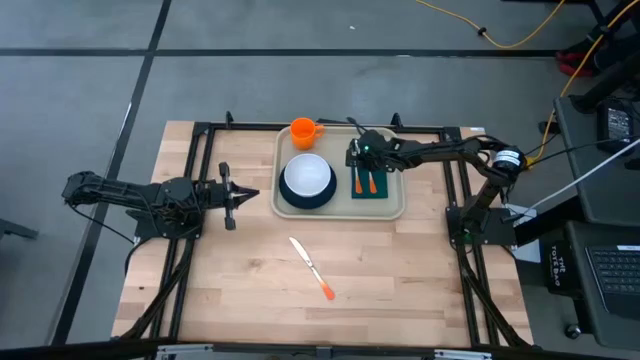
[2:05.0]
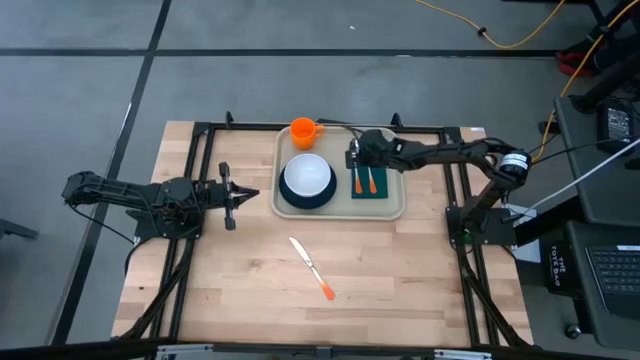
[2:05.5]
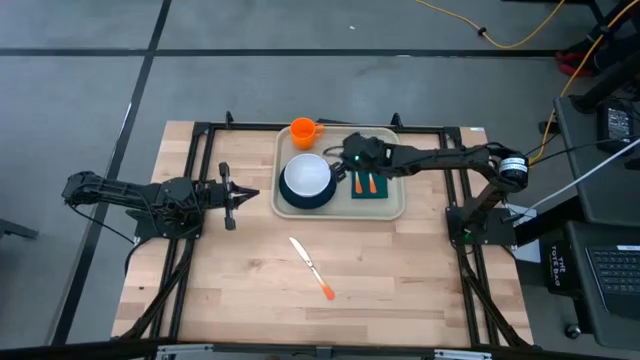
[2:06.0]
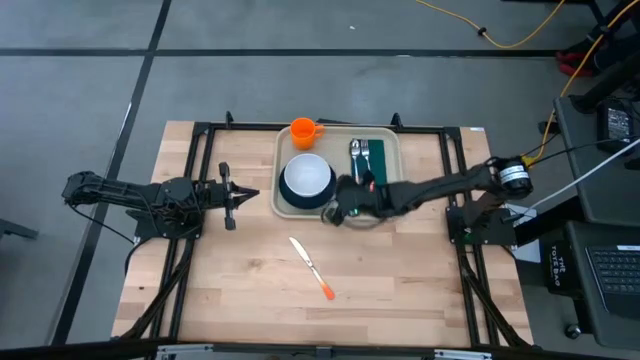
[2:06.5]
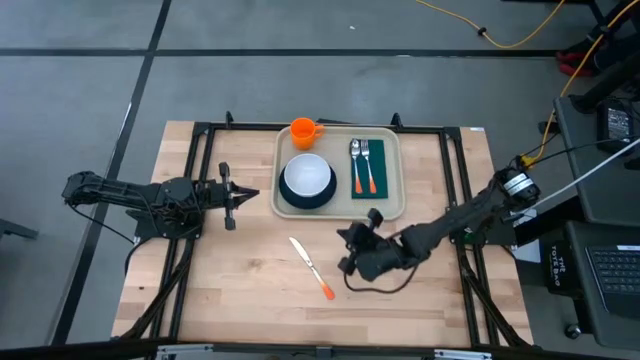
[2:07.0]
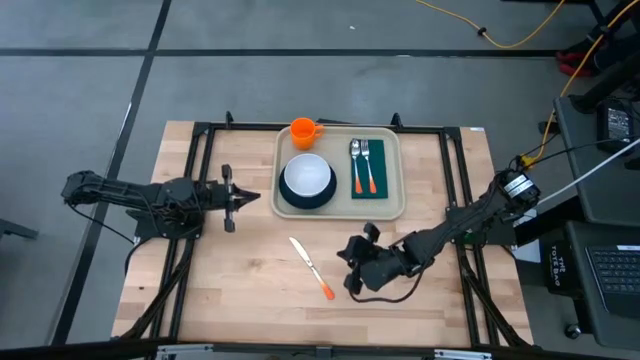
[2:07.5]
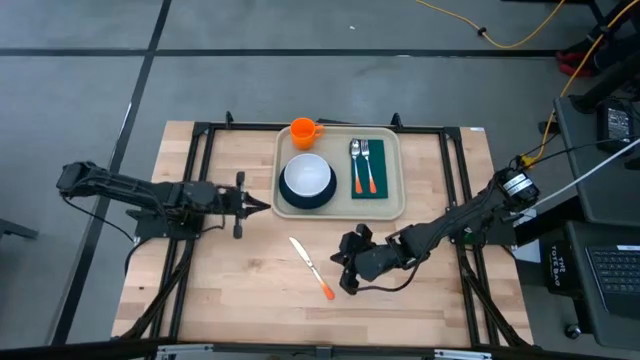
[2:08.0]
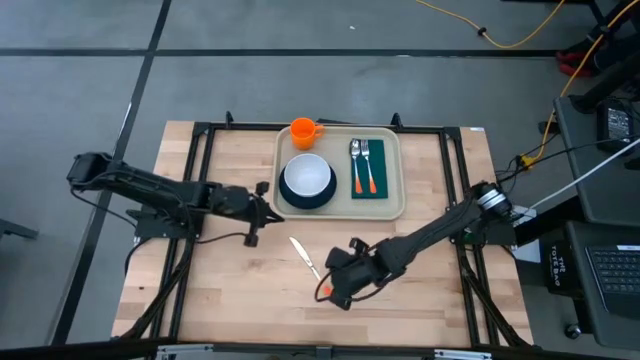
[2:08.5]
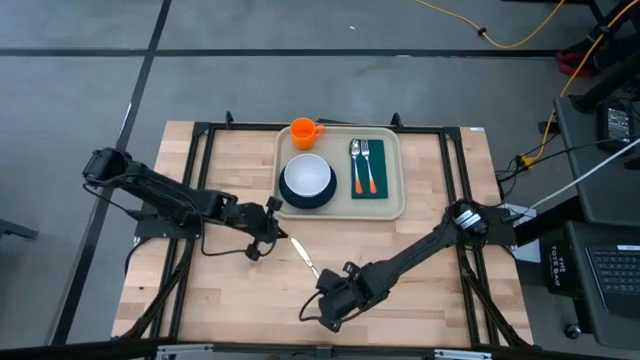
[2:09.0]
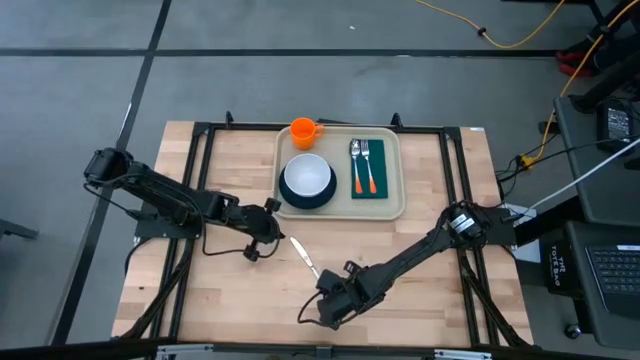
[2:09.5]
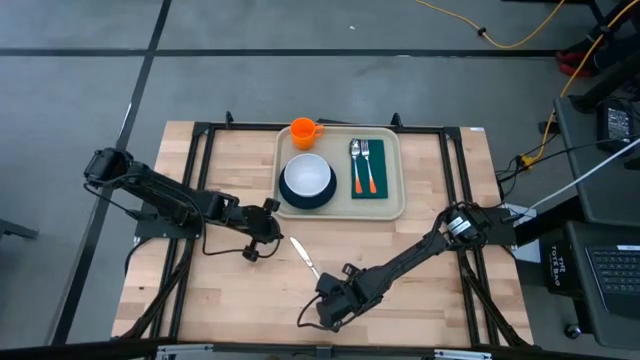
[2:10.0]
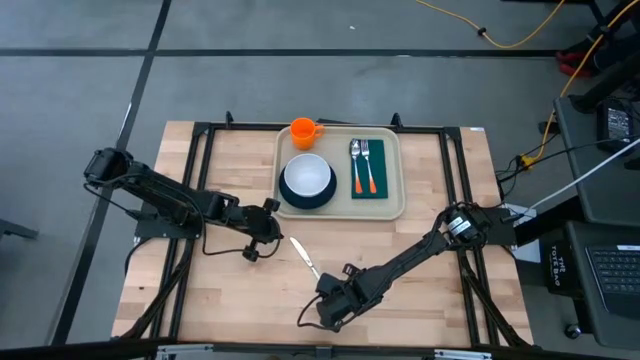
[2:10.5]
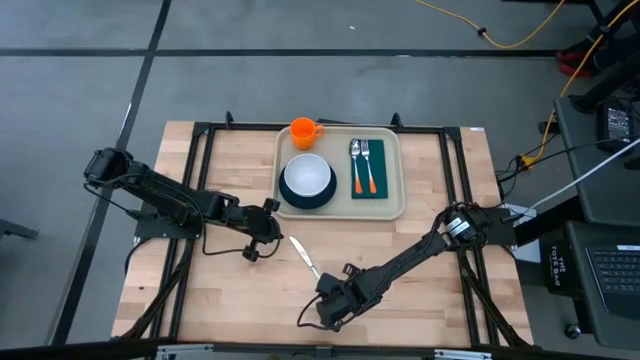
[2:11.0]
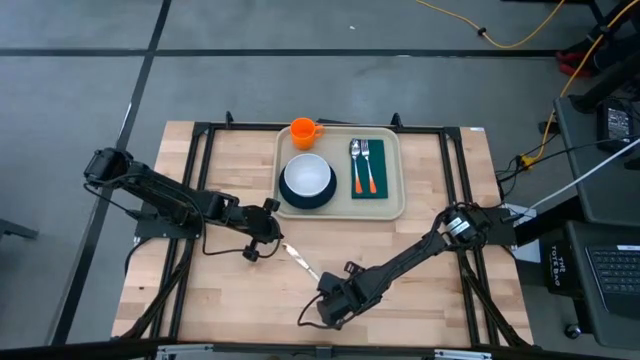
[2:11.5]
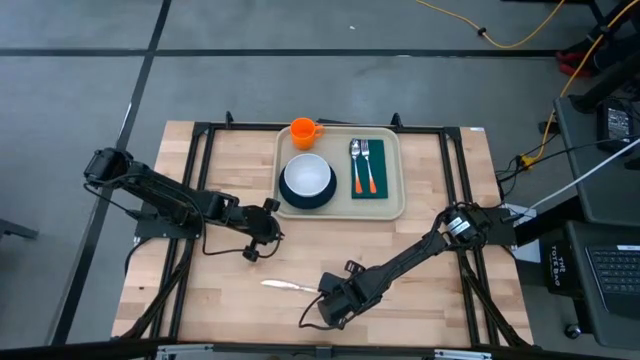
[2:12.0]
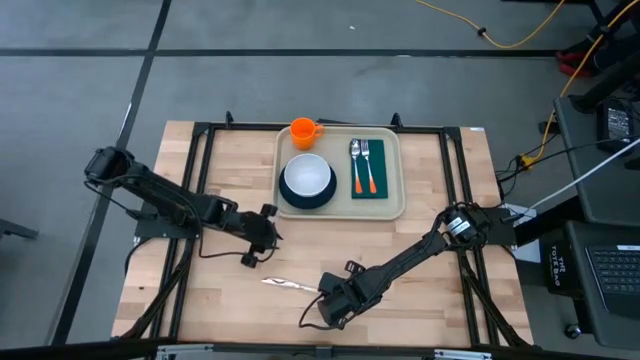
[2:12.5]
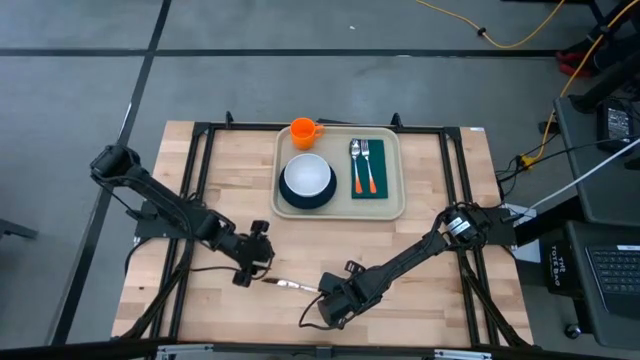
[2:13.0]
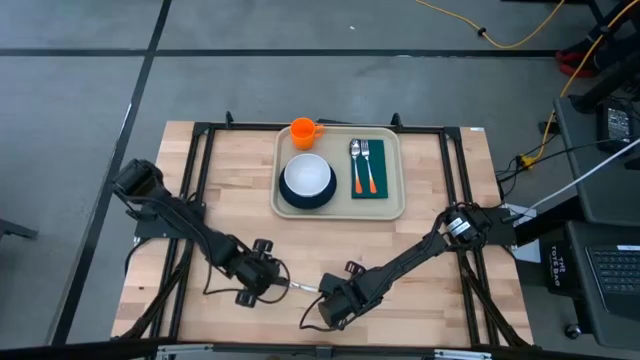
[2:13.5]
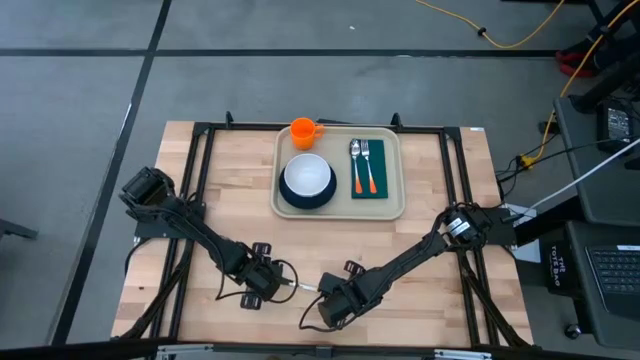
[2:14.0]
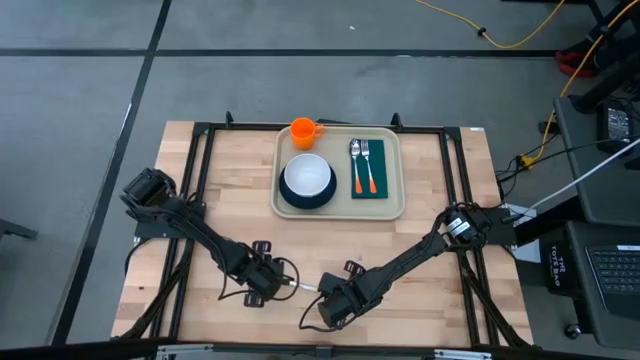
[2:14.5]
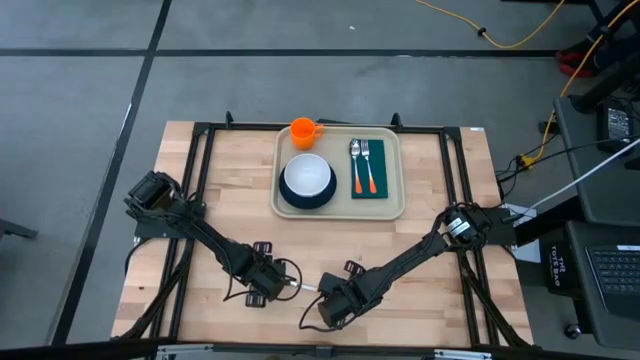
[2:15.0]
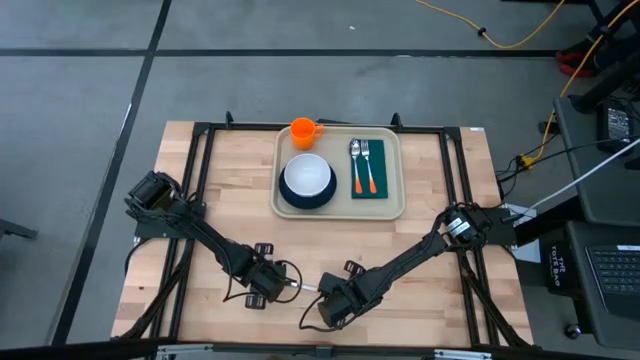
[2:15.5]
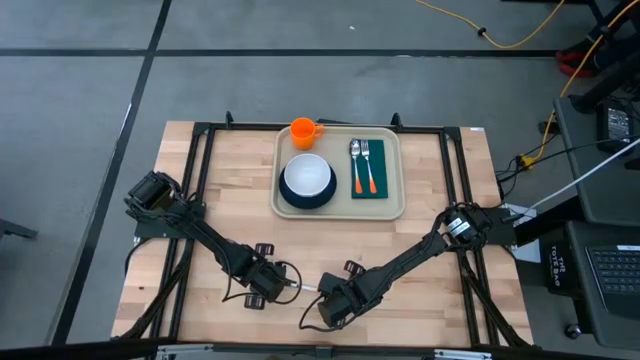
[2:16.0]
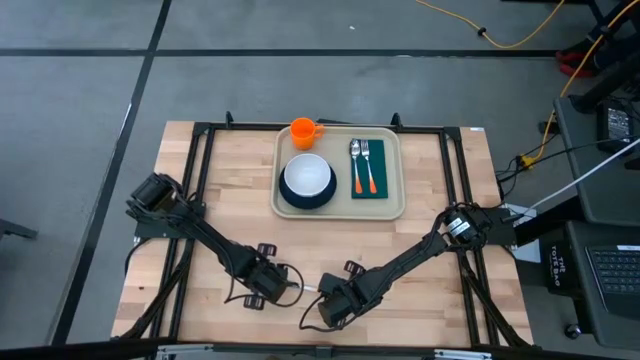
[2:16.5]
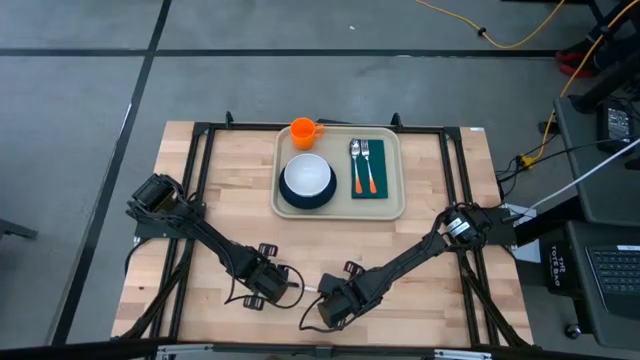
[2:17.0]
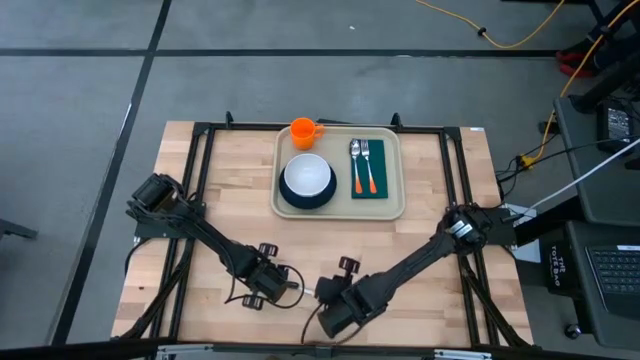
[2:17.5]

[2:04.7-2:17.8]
Task: Set up tray
Put the orange knife on the dark green napkin on the gray tray

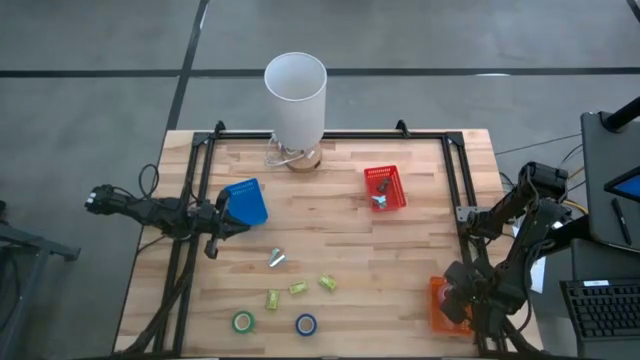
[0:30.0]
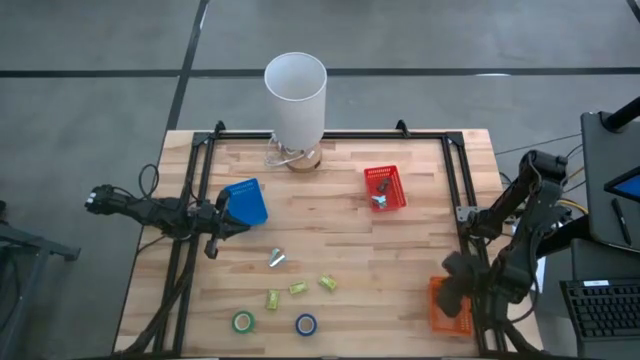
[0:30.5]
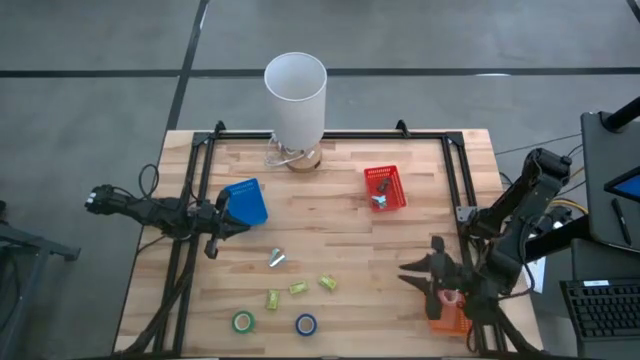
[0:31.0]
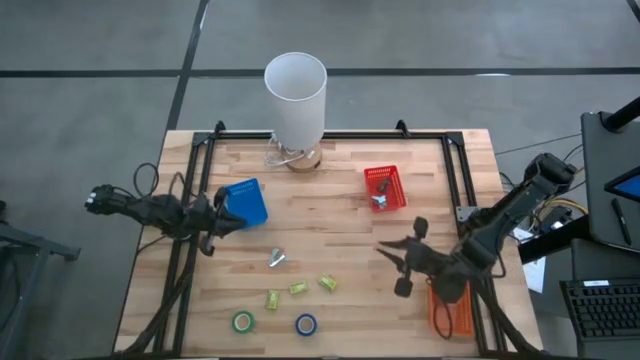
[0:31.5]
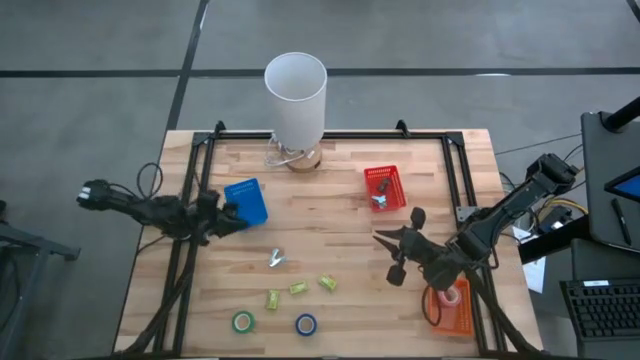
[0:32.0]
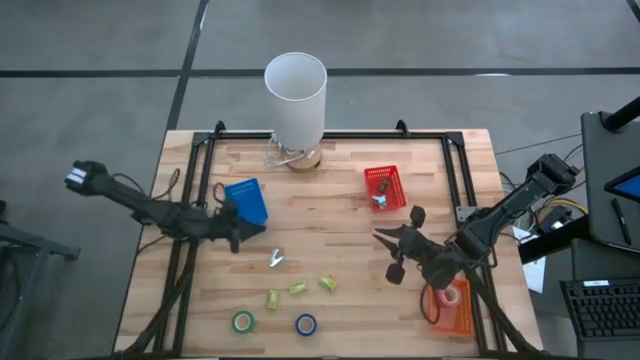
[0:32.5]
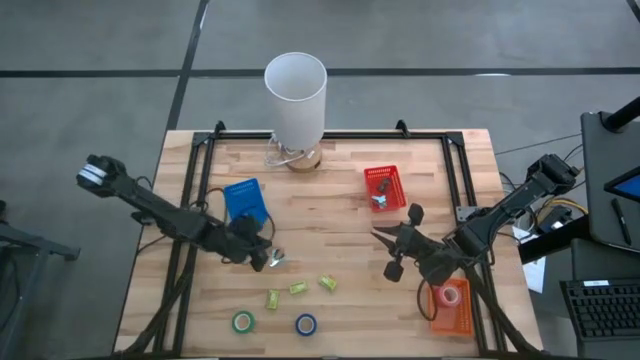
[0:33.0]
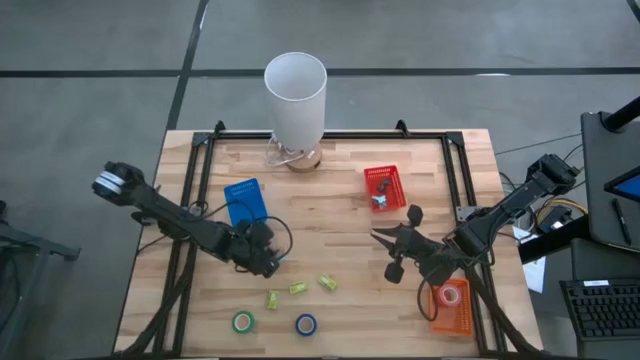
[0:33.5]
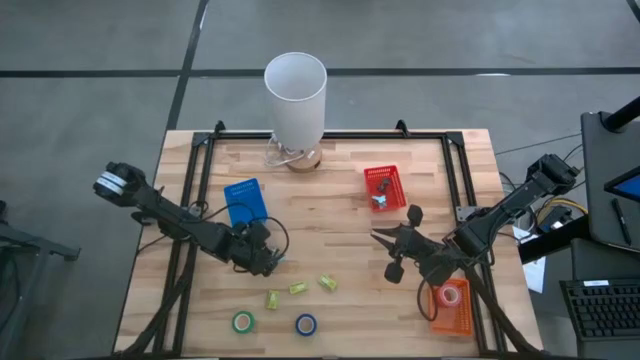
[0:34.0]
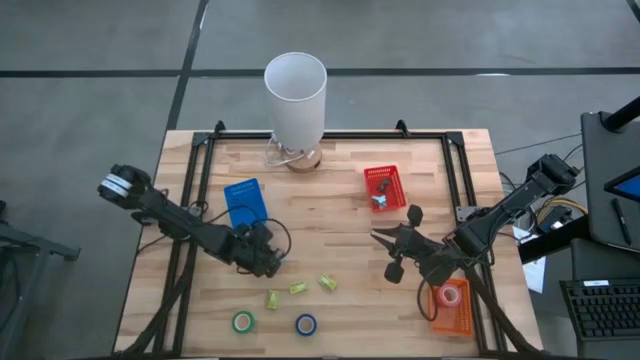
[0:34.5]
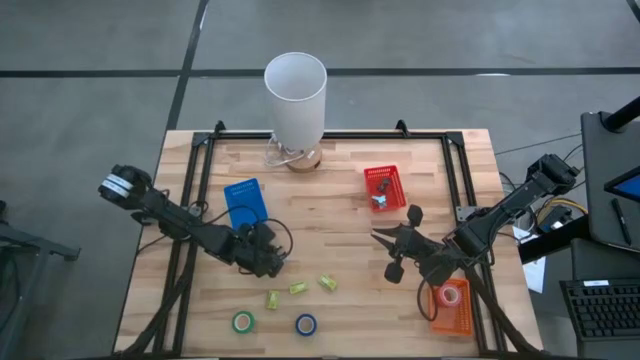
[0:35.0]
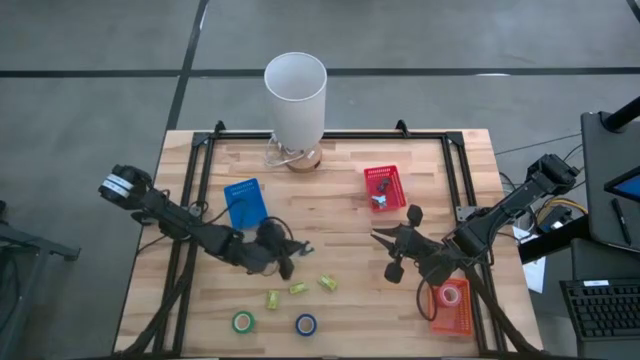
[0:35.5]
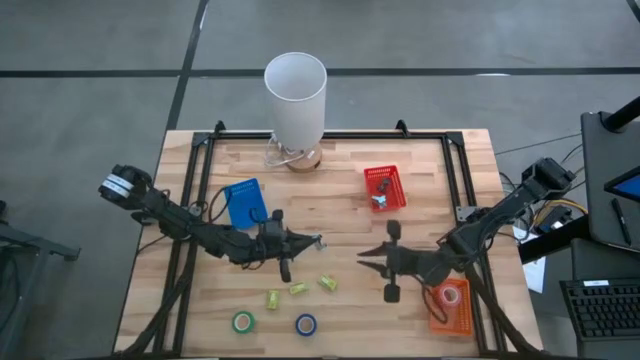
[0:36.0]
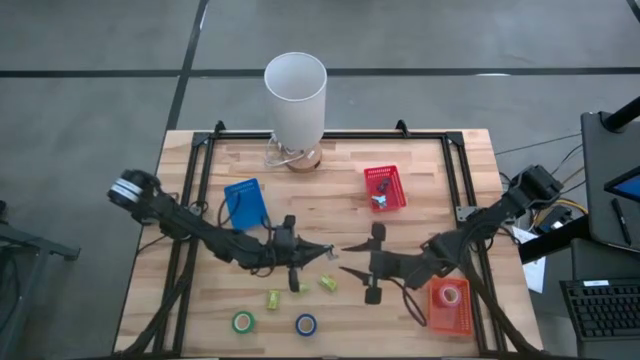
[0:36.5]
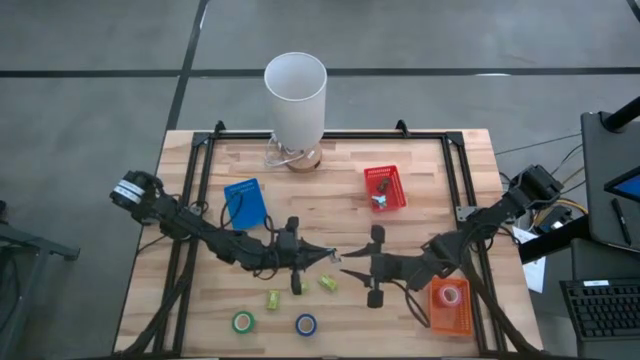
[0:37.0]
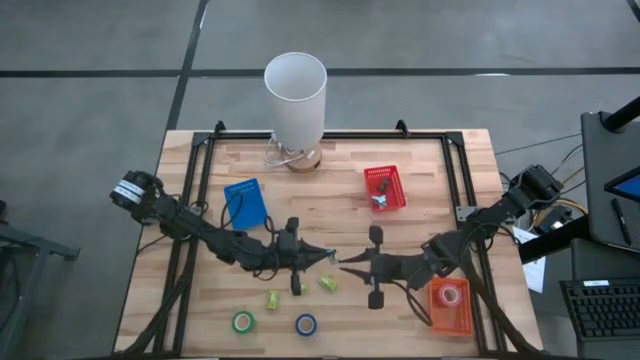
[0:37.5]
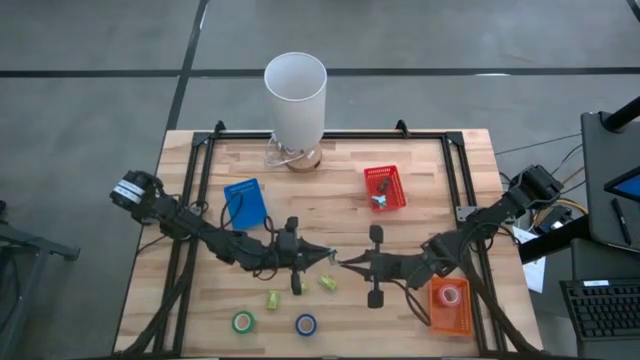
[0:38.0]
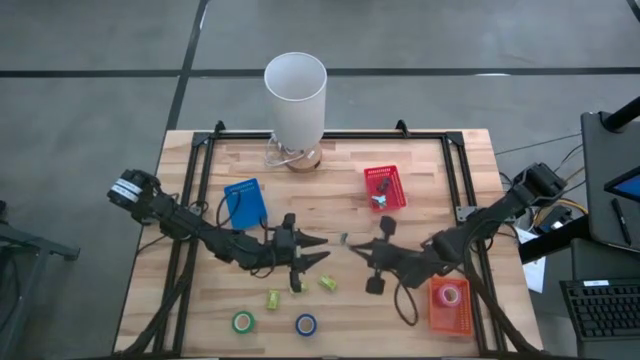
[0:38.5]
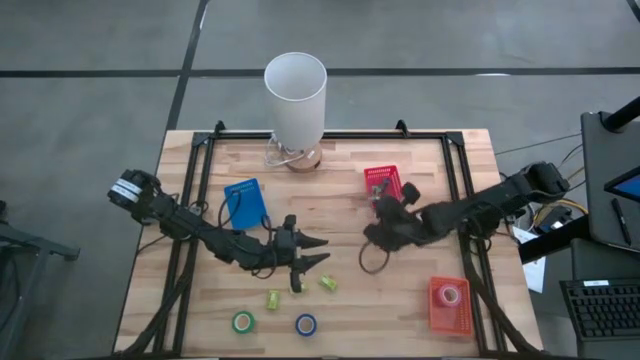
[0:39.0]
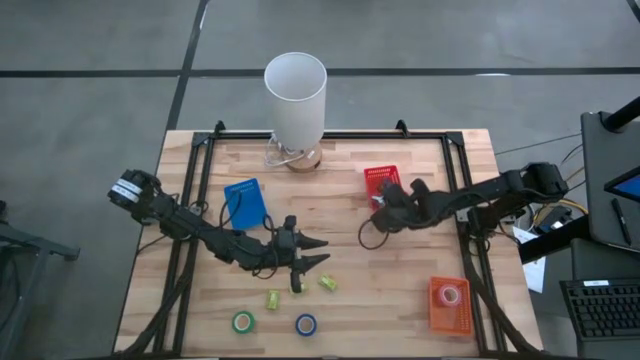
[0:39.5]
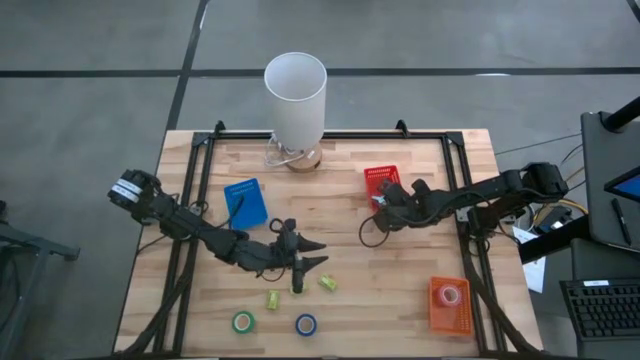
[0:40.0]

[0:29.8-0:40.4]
Task: Pick and place Stapler, Stapler remover, tape
Put the blue staple remover into the red basket
